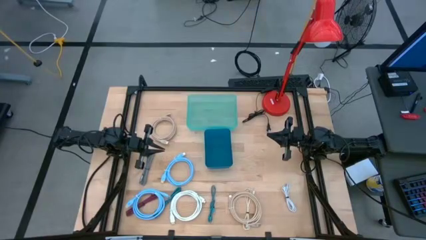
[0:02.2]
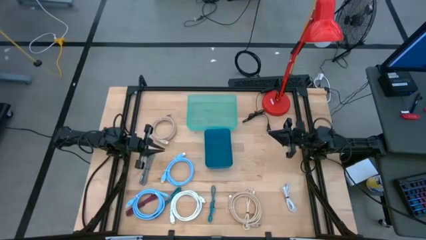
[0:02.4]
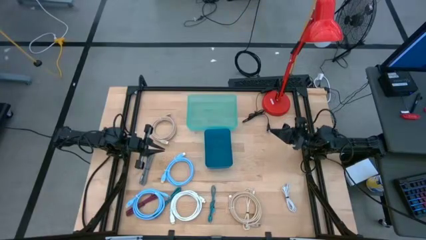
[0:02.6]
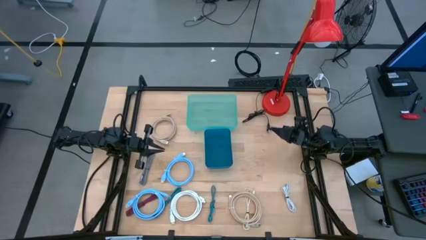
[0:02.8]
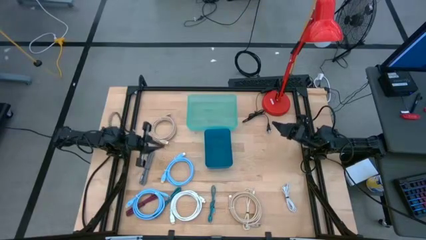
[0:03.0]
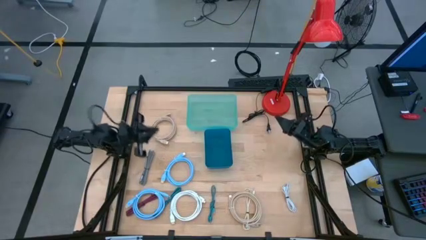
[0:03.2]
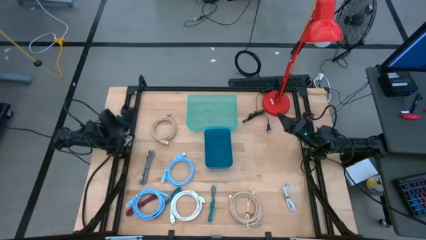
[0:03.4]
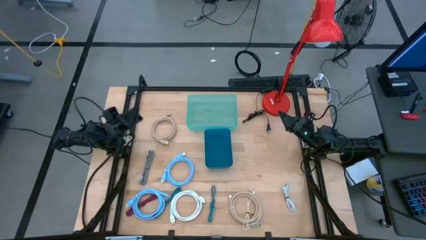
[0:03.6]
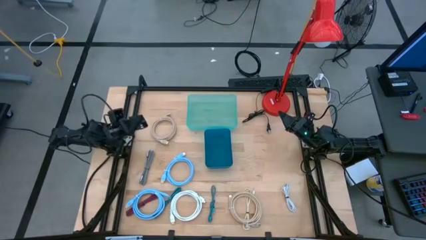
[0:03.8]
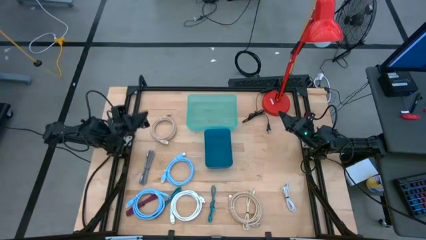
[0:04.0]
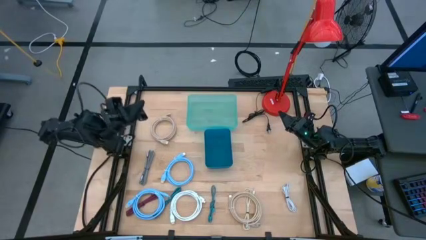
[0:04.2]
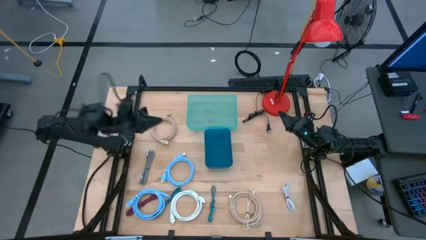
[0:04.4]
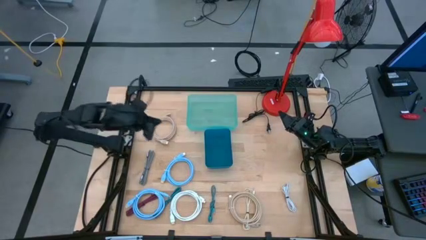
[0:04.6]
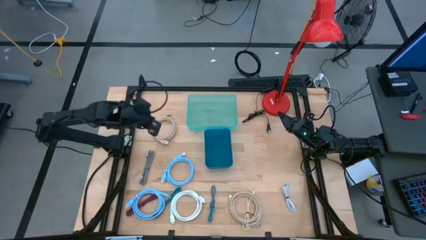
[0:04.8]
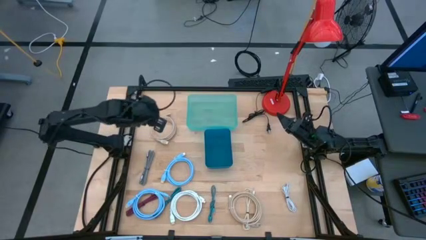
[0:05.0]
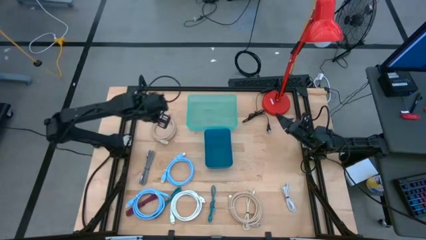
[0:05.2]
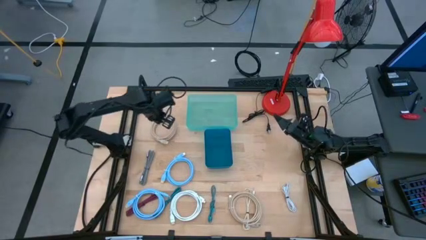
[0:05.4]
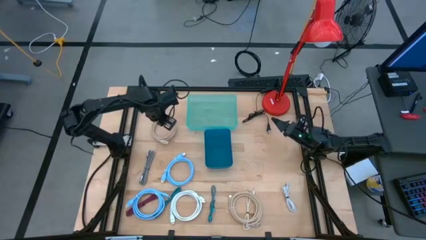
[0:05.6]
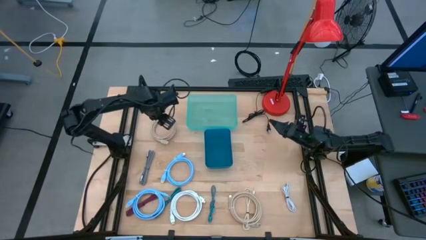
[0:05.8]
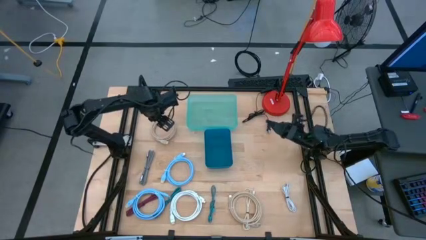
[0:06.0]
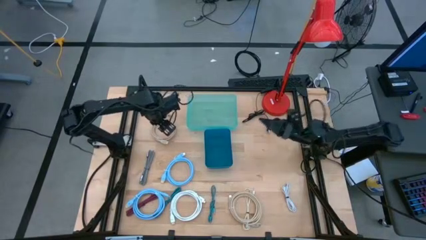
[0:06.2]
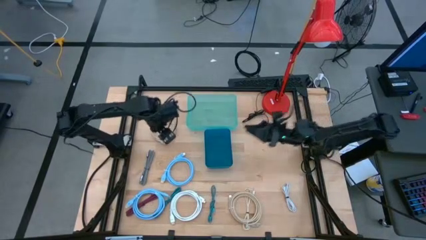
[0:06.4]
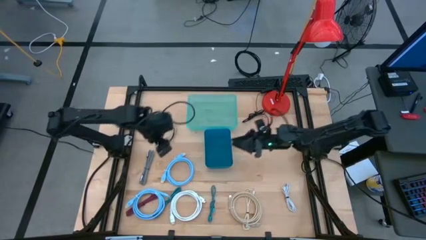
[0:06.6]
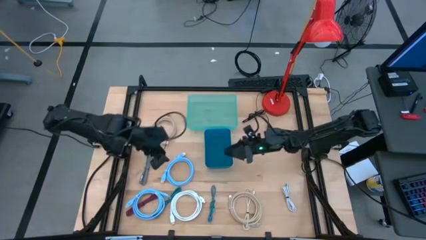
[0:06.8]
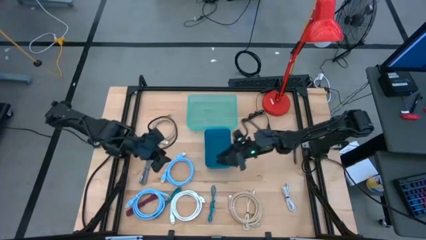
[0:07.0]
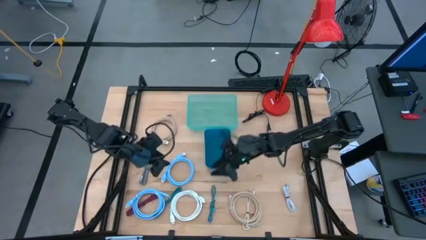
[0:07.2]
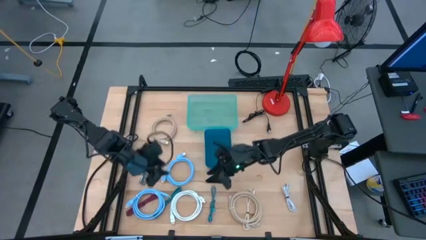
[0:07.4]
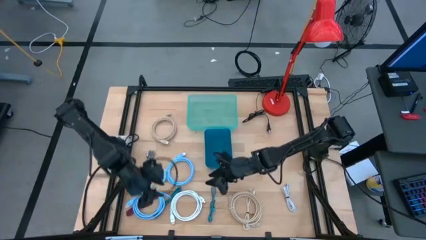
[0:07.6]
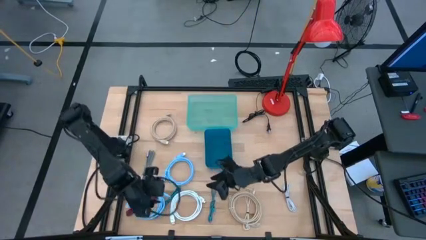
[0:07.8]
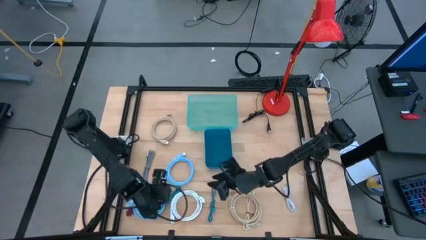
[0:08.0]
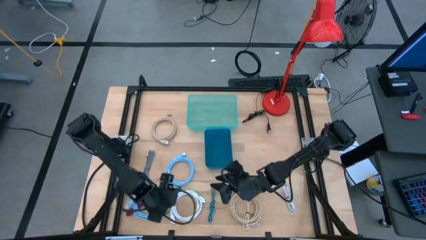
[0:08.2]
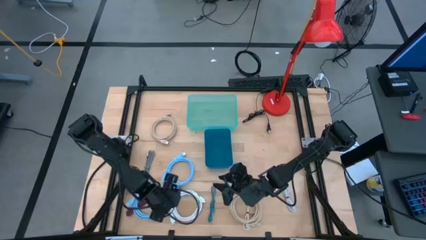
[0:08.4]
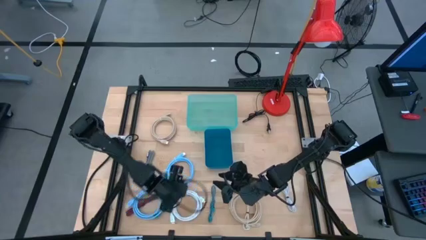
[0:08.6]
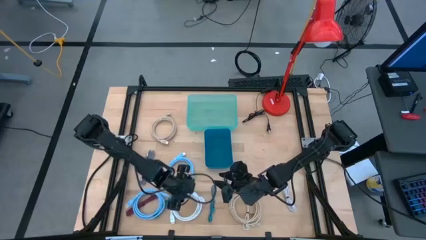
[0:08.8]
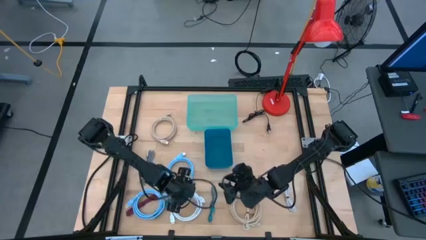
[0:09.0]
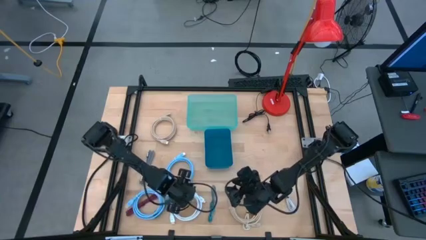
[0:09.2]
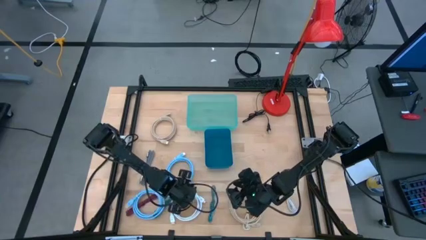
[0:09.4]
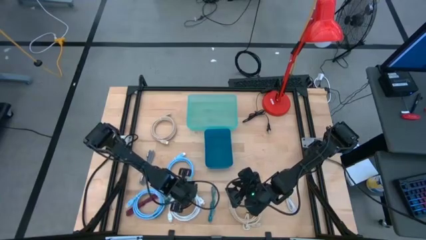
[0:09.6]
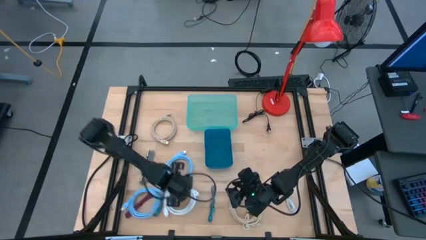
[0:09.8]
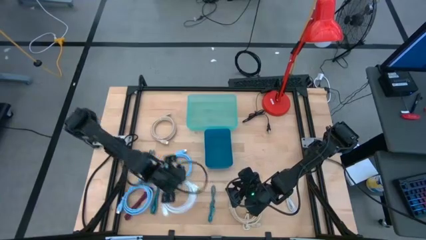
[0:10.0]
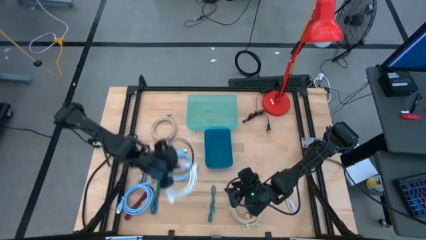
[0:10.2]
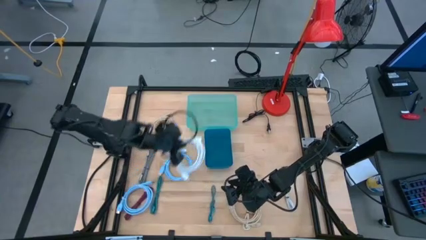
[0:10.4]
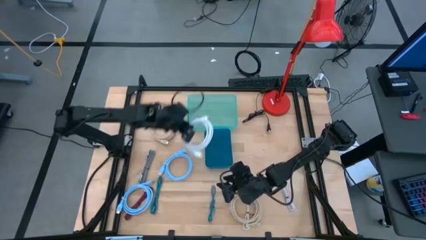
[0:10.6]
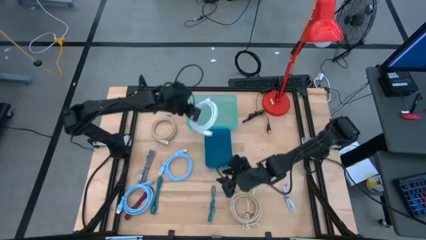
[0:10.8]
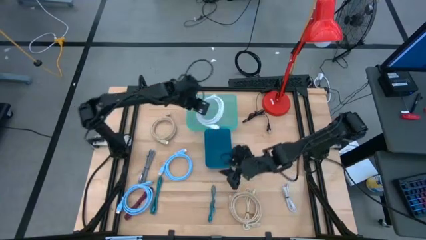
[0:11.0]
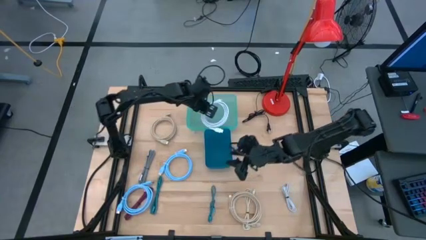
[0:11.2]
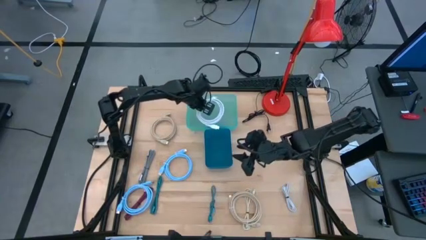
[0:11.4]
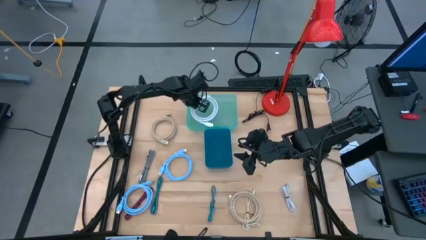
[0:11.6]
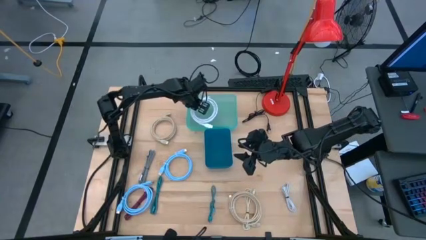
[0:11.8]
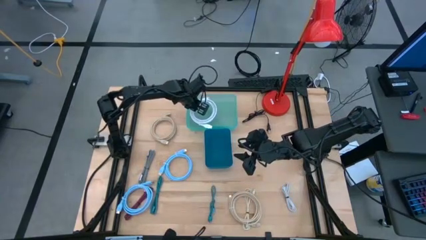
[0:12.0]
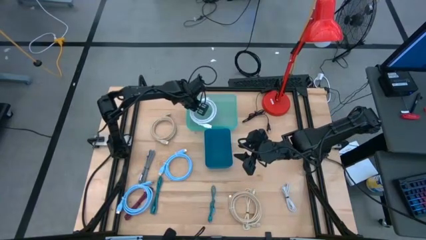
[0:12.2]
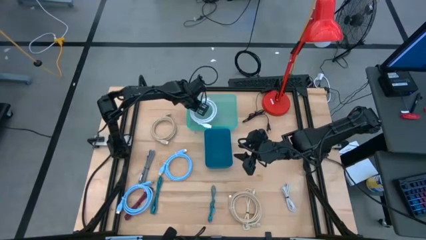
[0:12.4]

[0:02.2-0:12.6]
Task: Pick & Place USB Port
Put the white HDMI cable into the green bin
